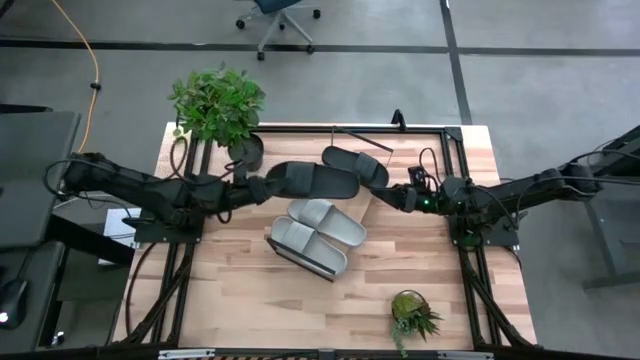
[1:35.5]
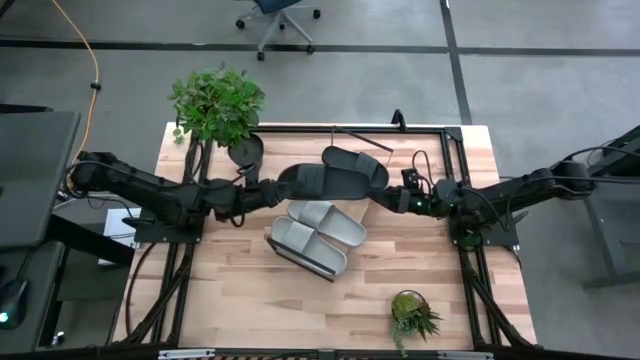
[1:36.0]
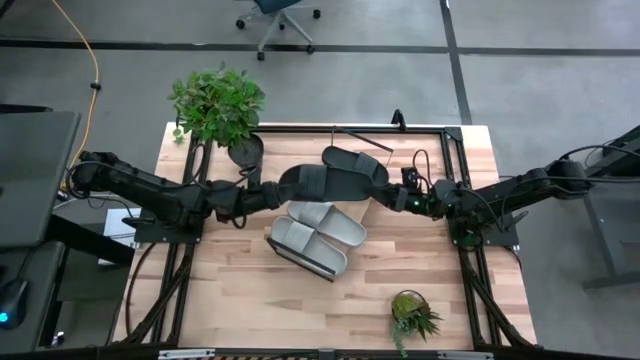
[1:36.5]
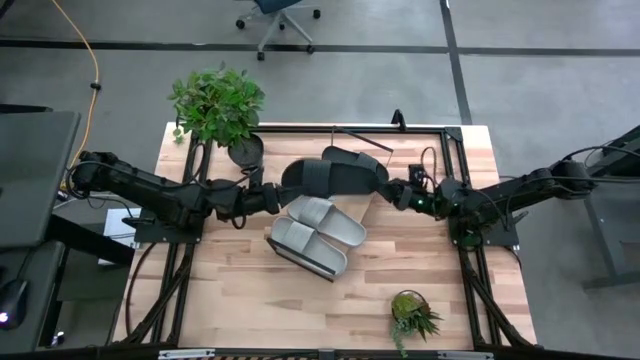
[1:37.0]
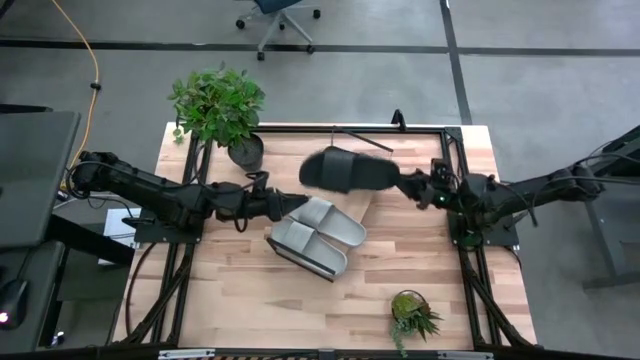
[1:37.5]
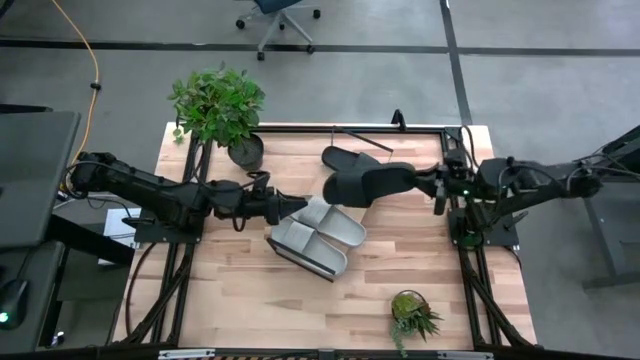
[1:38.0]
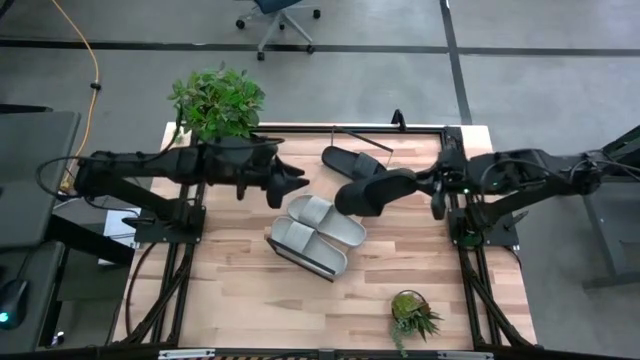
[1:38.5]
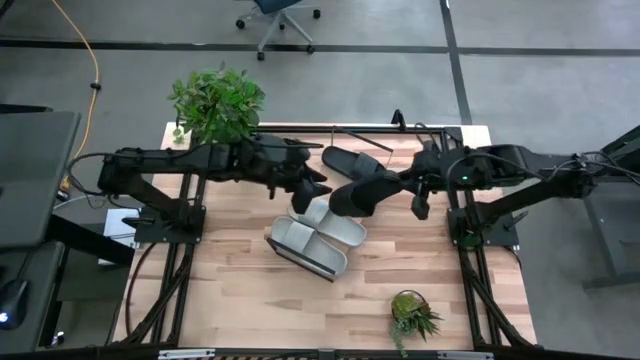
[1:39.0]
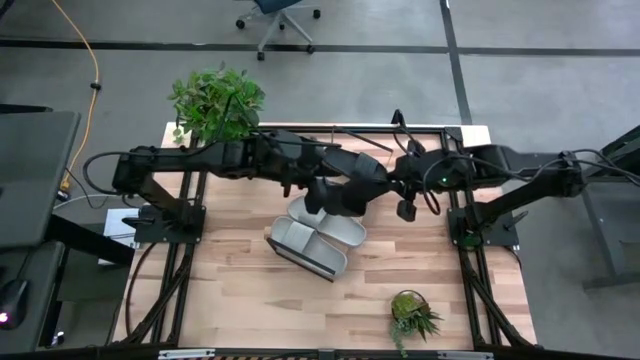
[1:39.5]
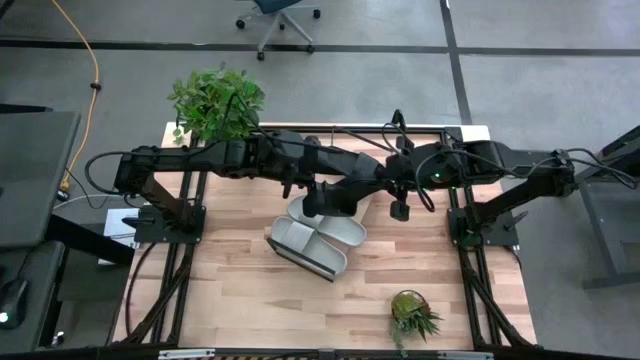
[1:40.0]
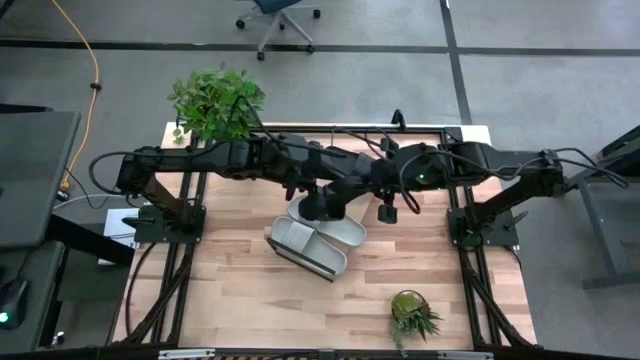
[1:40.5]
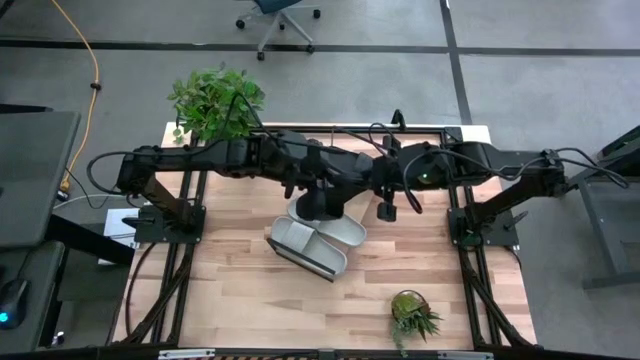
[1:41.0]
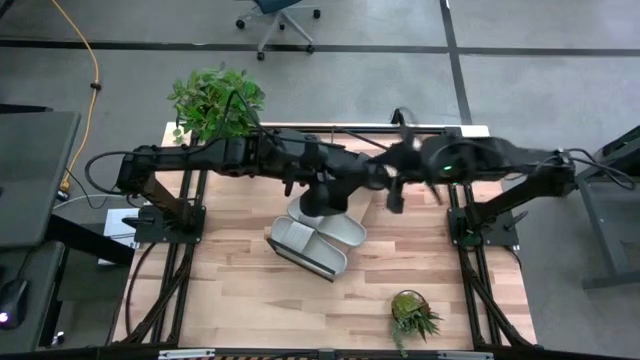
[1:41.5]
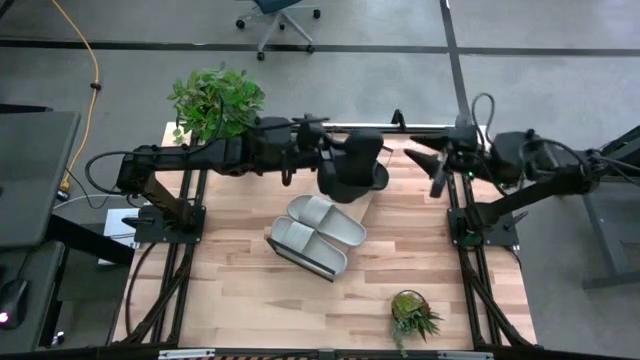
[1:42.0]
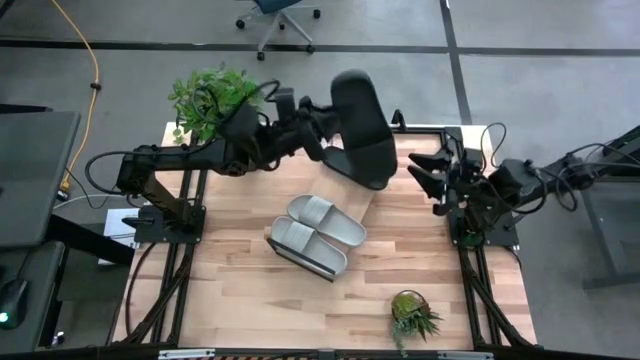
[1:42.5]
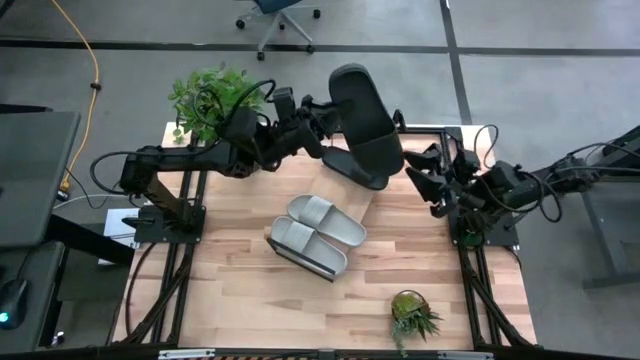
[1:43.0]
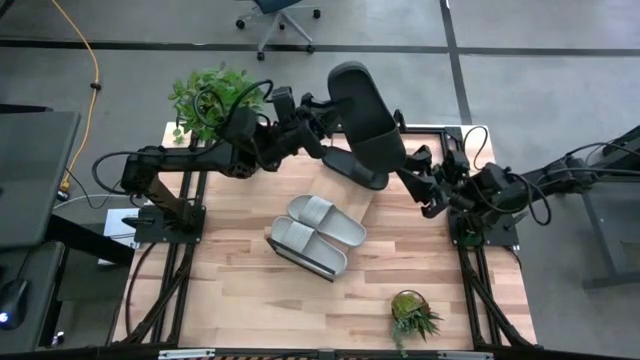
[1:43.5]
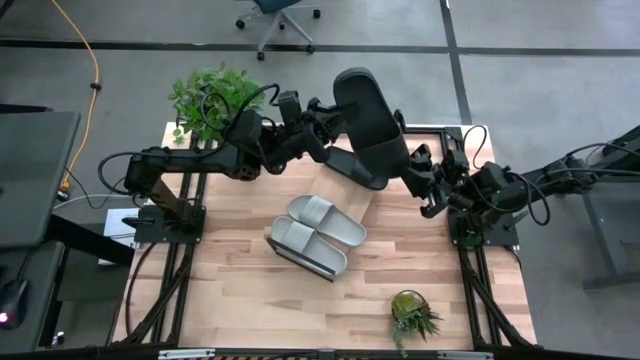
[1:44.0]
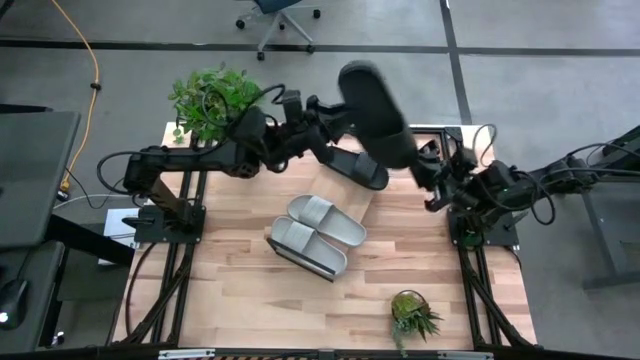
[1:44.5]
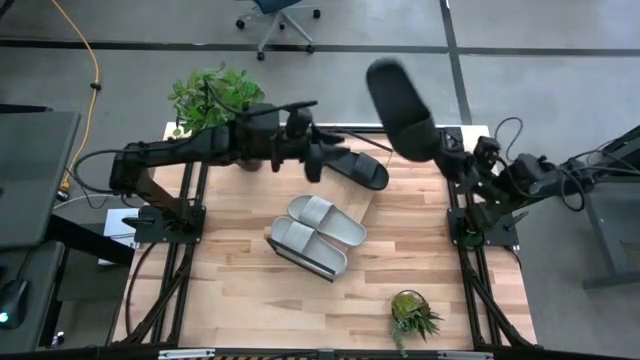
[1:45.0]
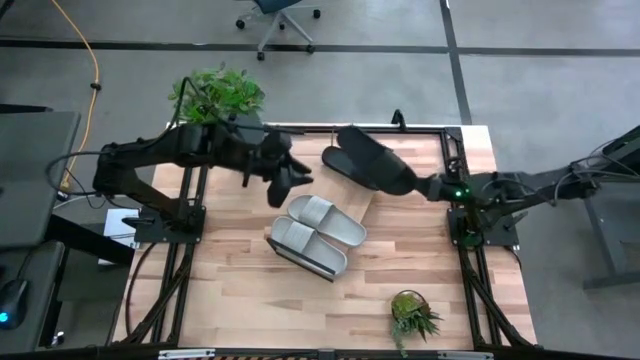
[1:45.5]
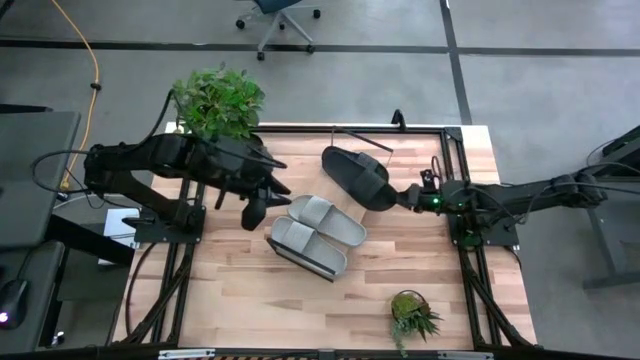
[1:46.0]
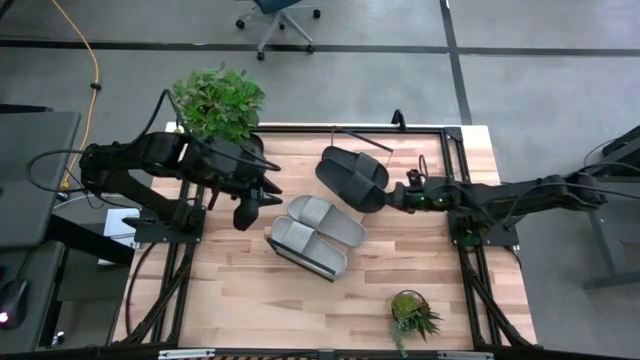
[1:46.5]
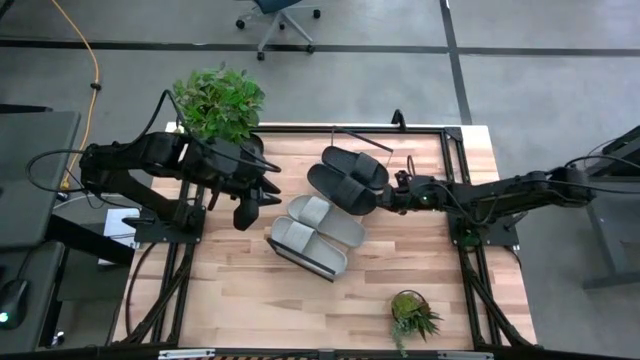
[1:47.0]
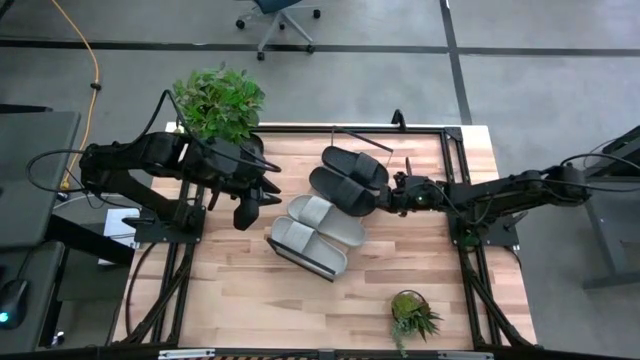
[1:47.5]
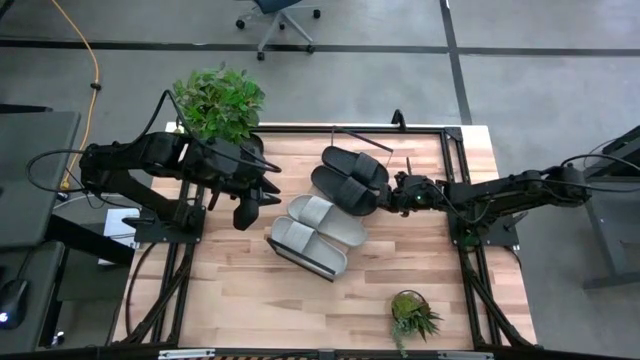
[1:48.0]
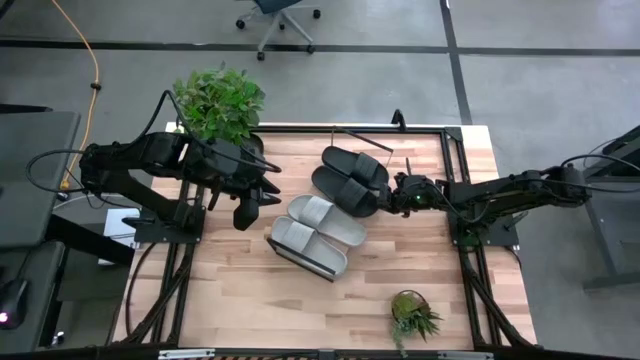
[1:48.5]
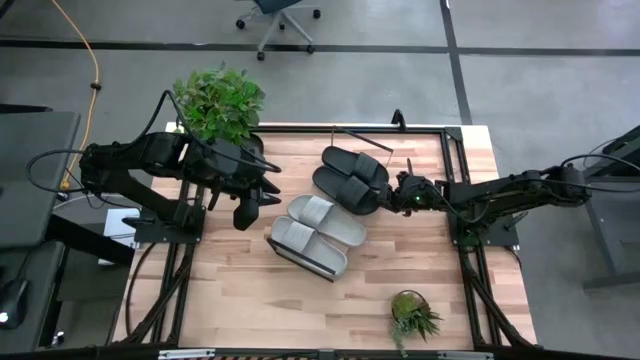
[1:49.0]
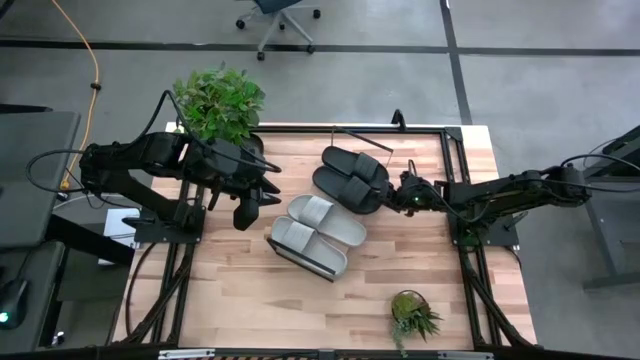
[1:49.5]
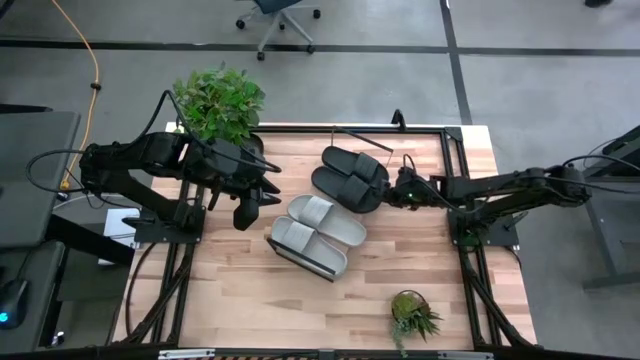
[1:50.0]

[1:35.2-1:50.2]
Task: Pick and place slides into the shelf
Put the black slide on the shelf

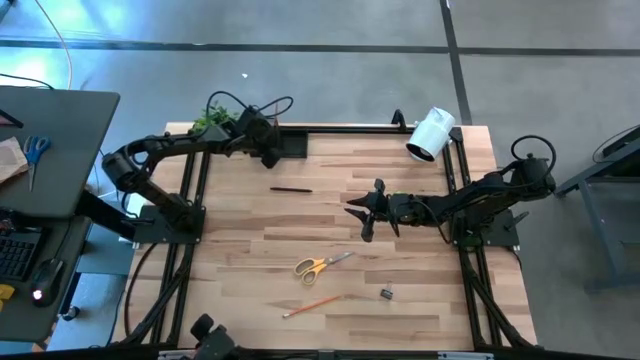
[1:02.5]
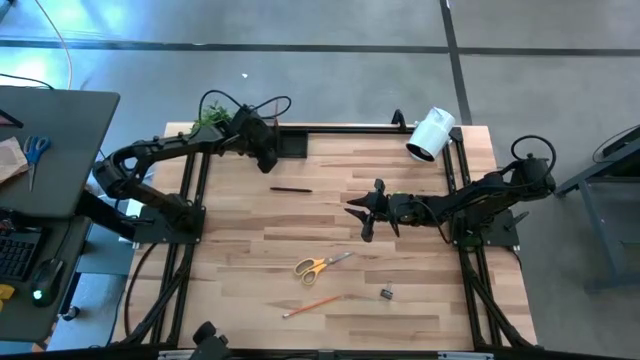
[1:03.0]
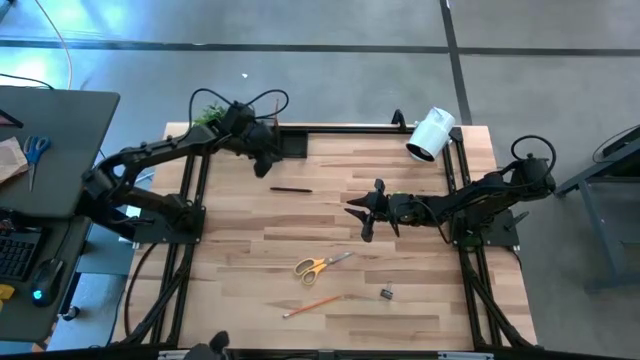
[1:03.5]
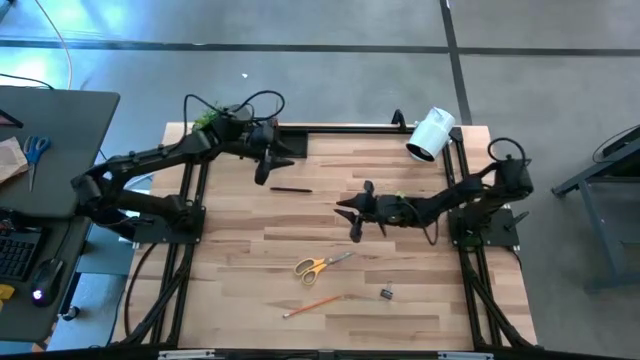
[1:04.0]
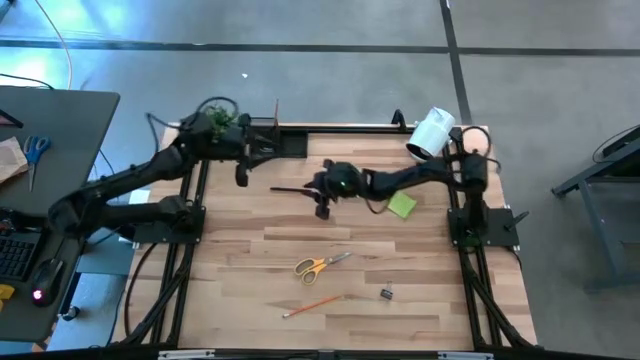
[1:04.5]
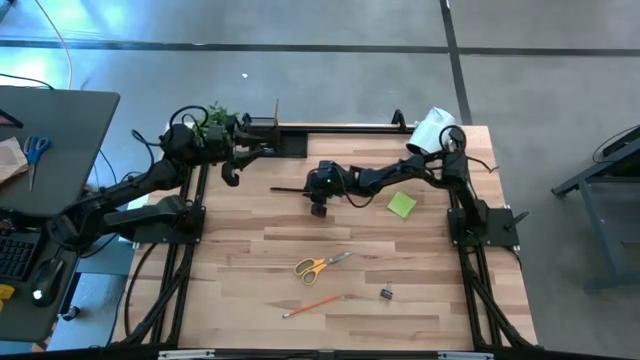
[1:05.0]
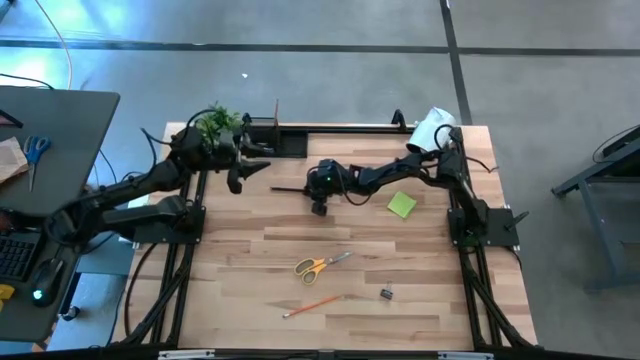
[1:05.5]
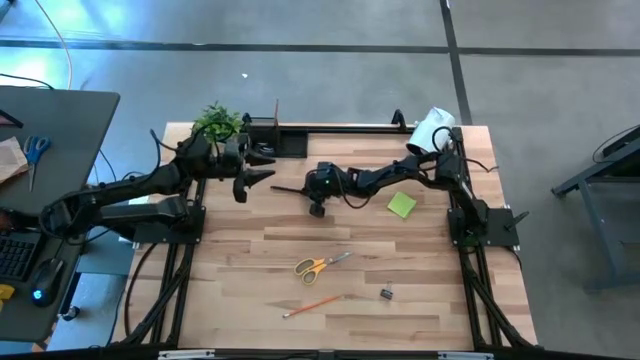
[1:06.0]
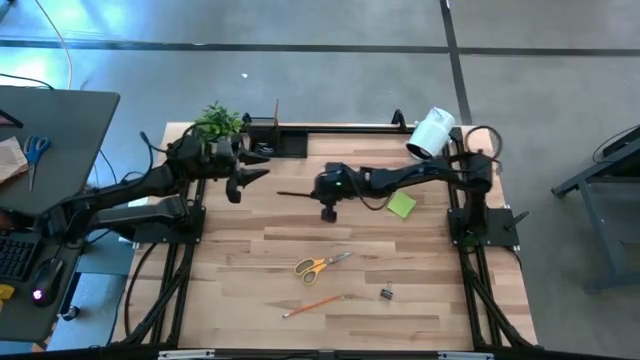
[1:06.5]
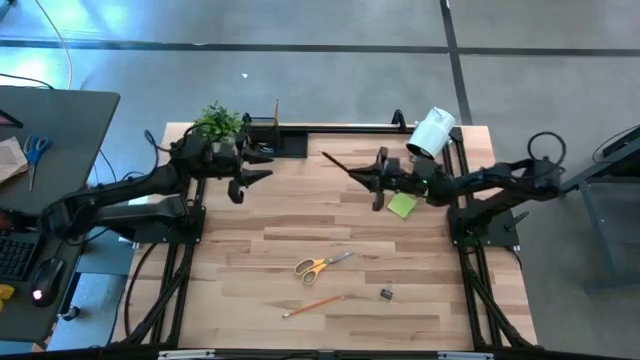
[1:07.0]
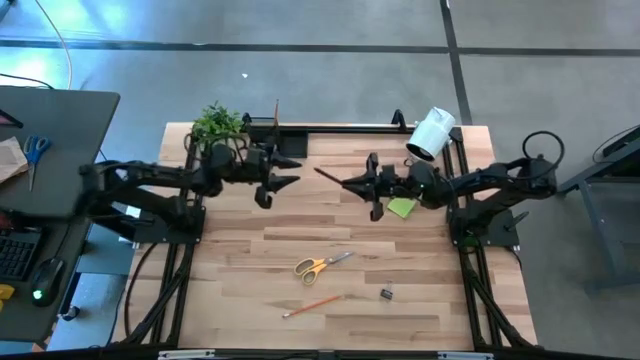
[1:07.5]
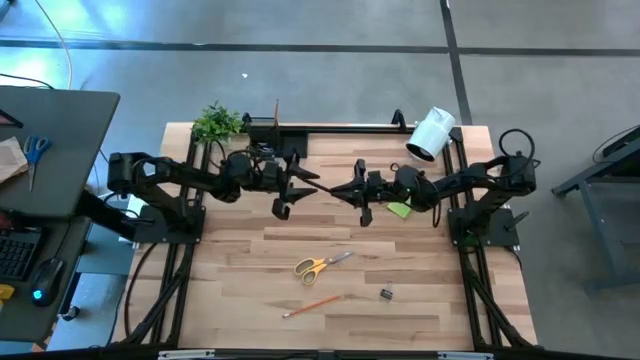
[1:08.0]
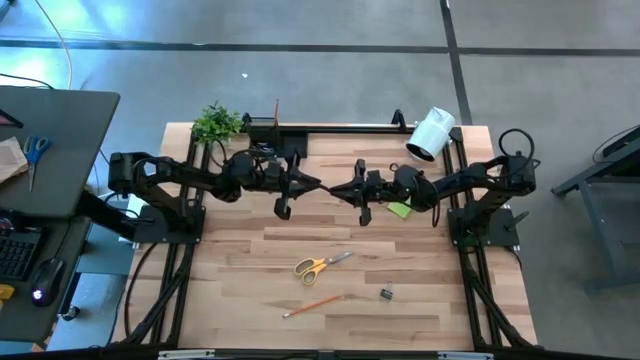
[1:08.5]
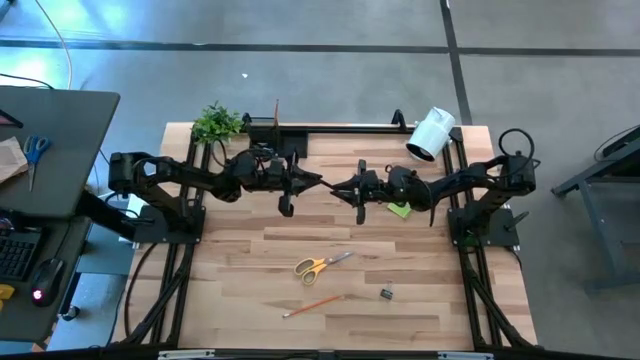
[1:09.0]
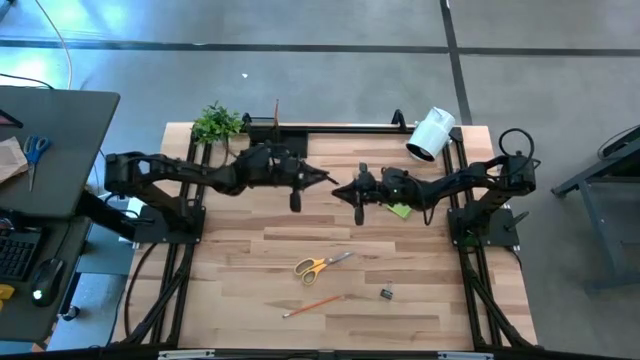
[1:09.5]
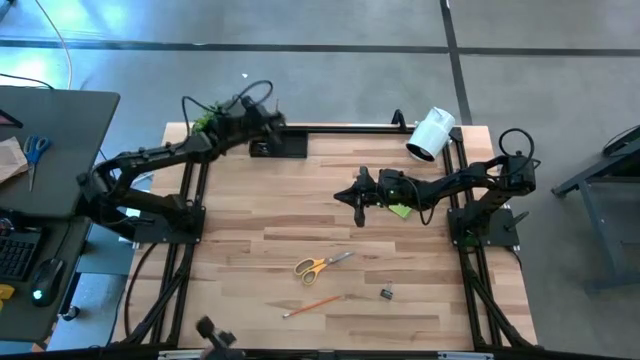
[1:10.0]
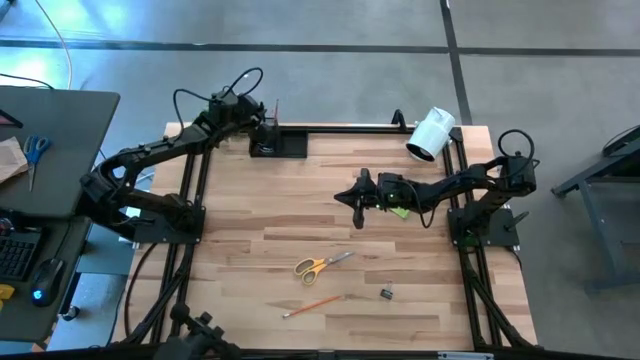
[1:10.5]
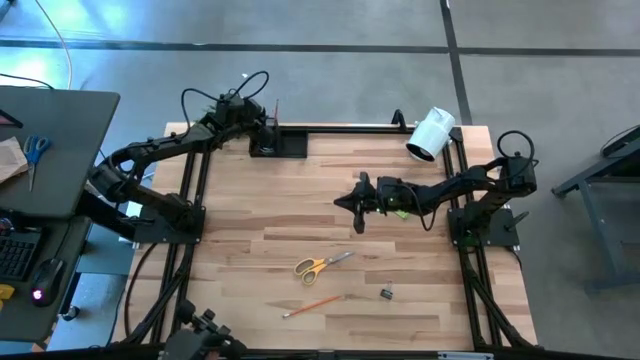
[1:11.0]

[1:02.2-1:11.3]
Task: Pick and place office supplies into organizer
Put the black pen into the top left section of the desk organizer
